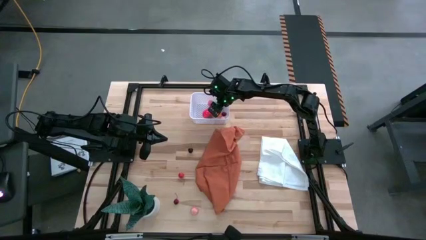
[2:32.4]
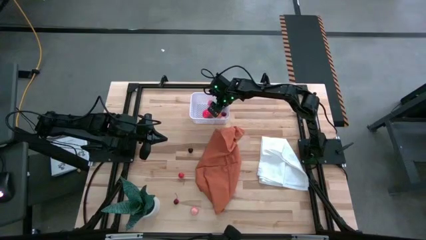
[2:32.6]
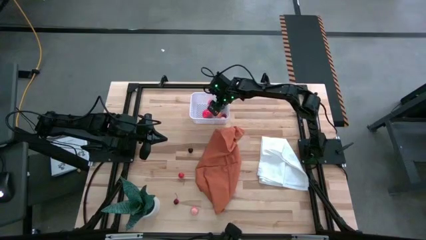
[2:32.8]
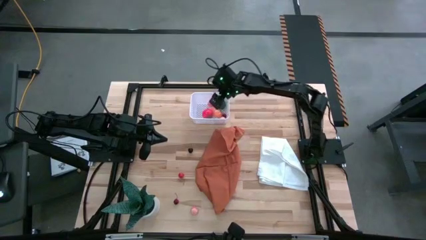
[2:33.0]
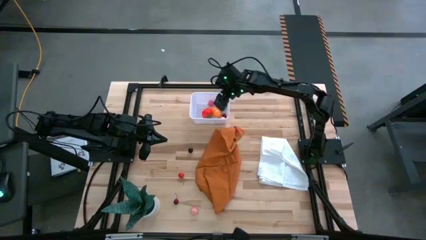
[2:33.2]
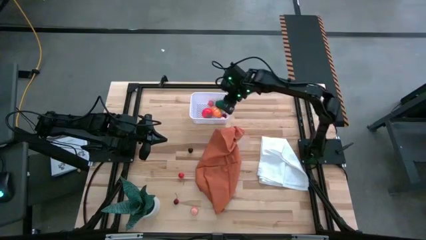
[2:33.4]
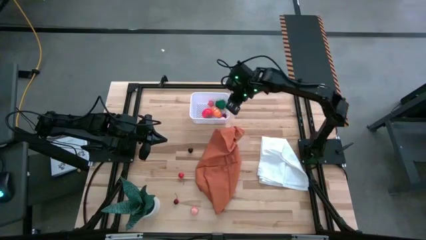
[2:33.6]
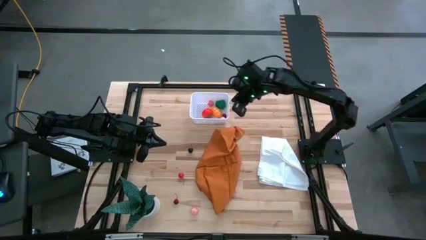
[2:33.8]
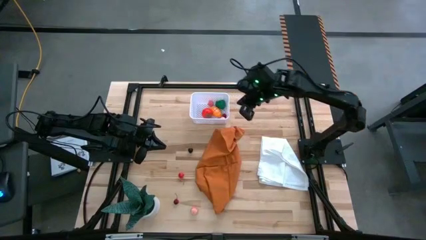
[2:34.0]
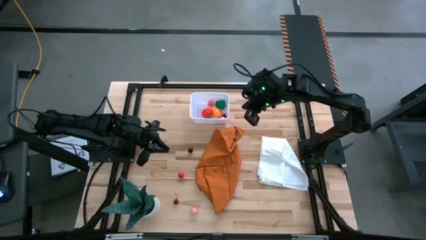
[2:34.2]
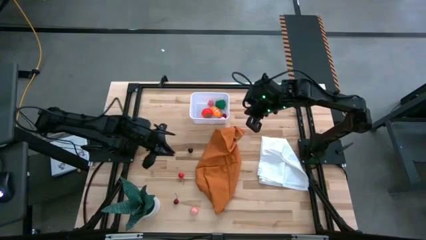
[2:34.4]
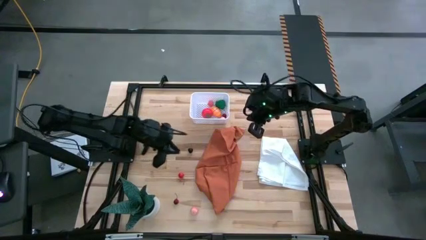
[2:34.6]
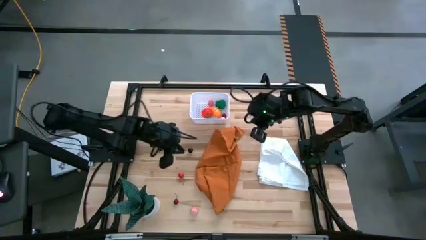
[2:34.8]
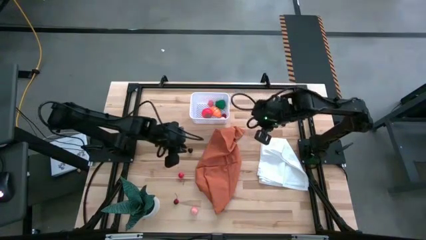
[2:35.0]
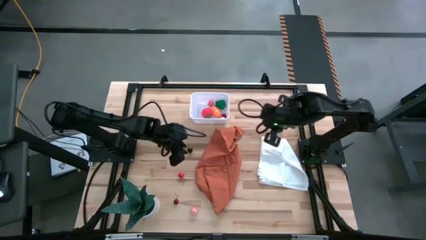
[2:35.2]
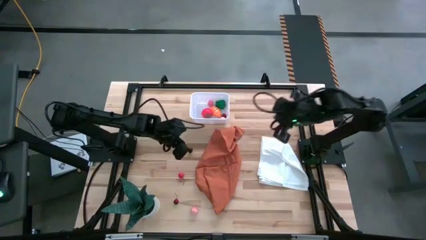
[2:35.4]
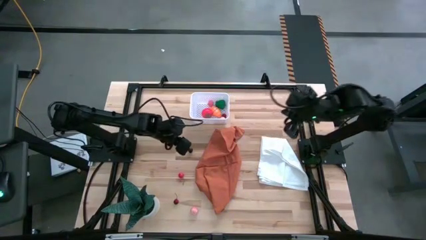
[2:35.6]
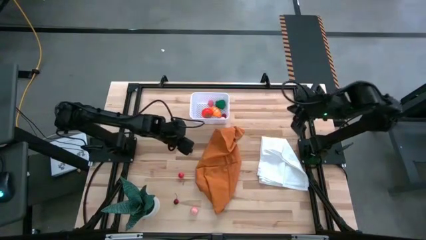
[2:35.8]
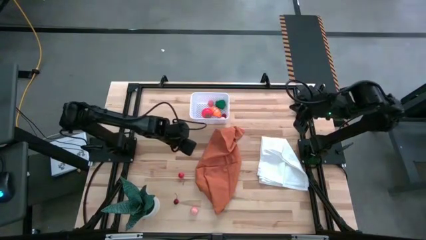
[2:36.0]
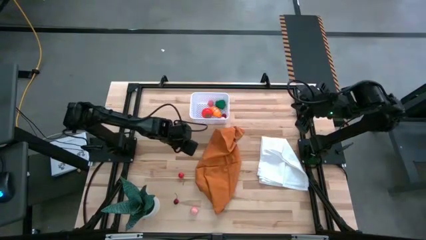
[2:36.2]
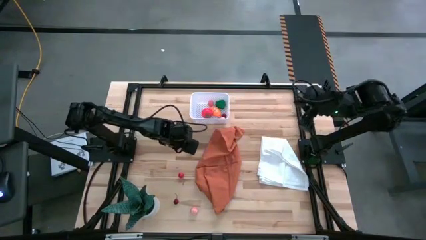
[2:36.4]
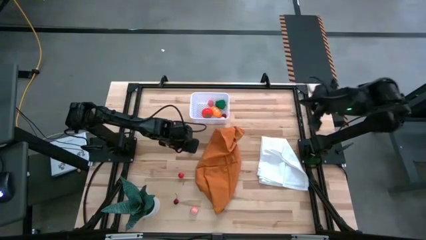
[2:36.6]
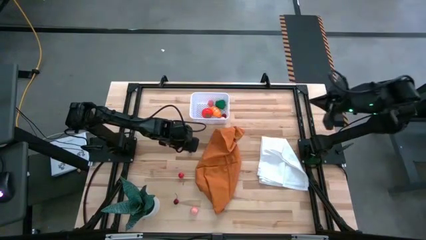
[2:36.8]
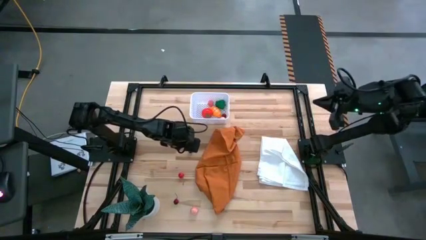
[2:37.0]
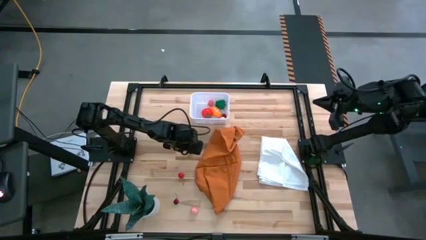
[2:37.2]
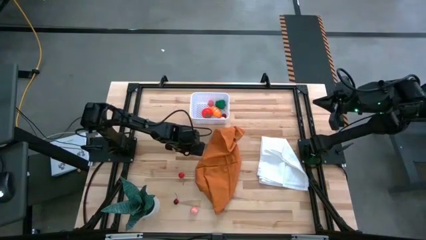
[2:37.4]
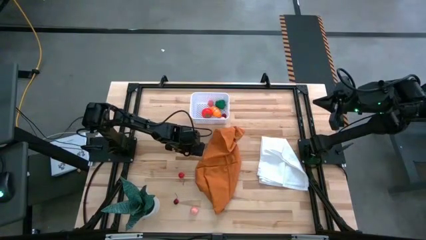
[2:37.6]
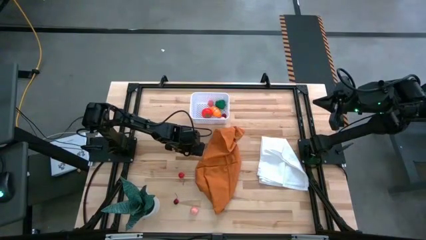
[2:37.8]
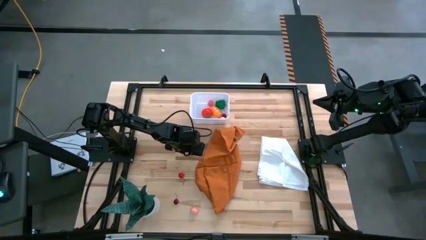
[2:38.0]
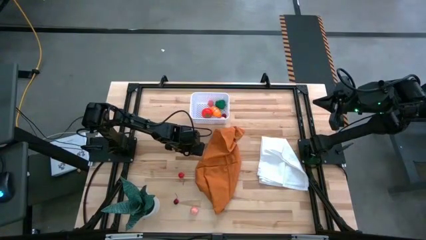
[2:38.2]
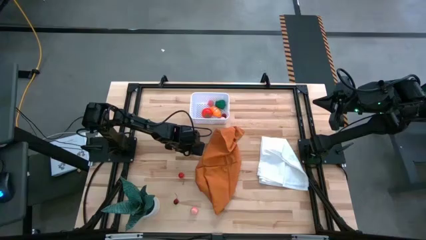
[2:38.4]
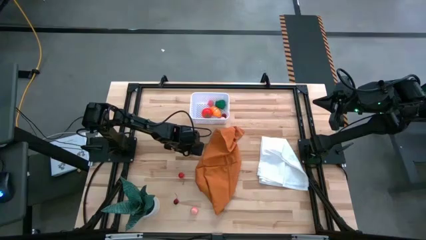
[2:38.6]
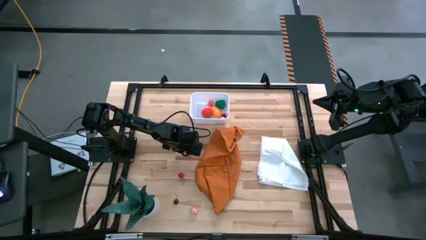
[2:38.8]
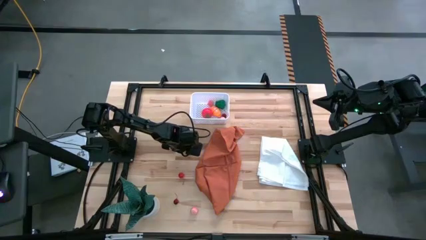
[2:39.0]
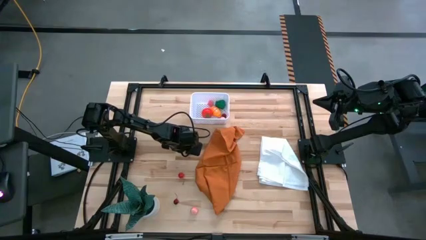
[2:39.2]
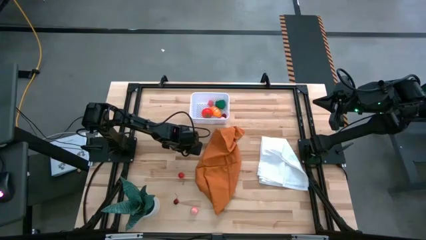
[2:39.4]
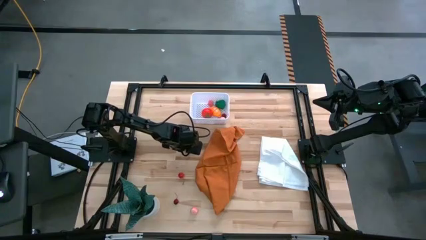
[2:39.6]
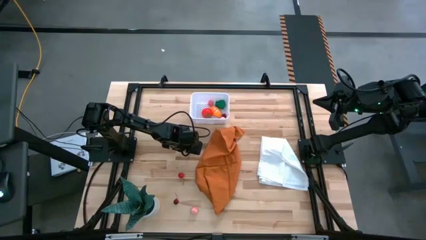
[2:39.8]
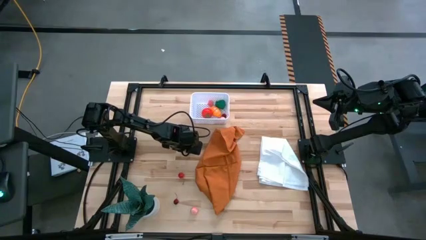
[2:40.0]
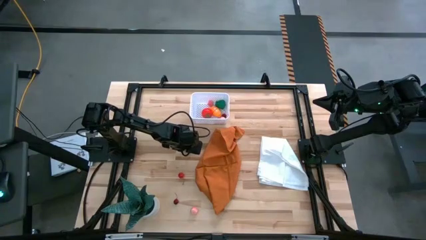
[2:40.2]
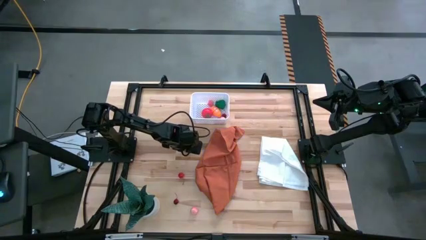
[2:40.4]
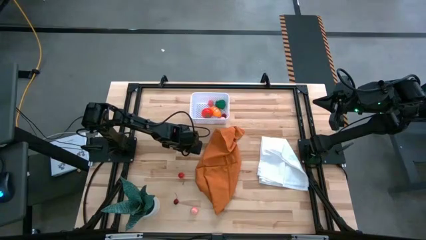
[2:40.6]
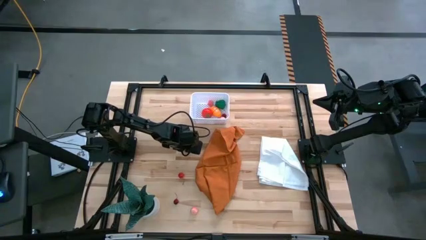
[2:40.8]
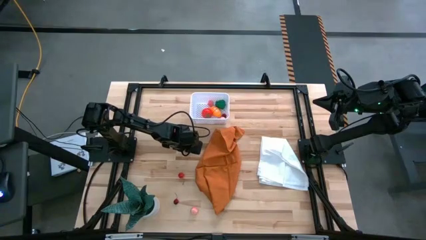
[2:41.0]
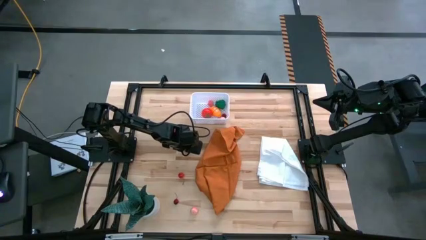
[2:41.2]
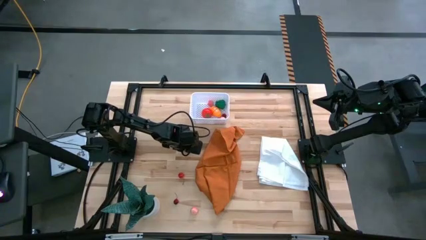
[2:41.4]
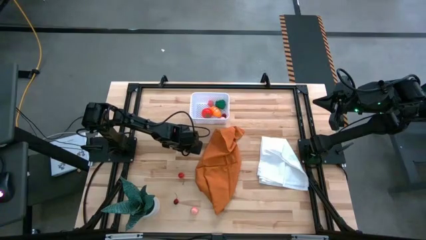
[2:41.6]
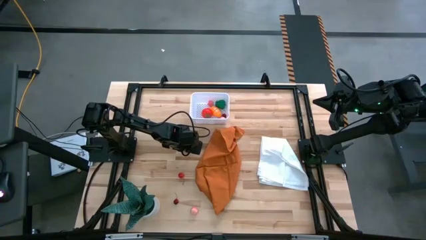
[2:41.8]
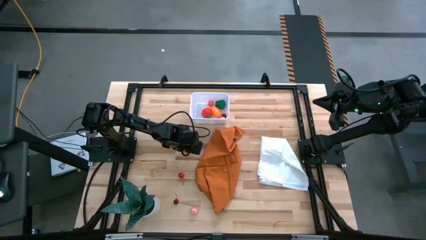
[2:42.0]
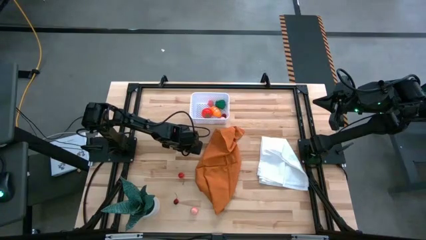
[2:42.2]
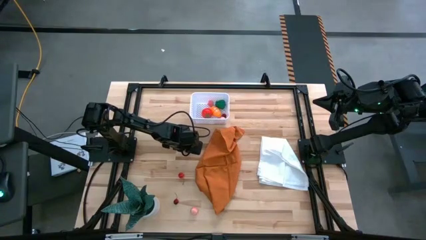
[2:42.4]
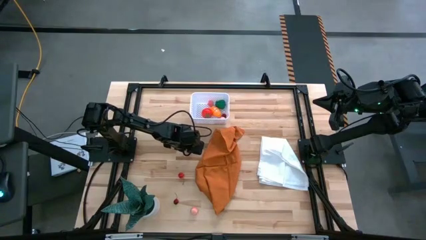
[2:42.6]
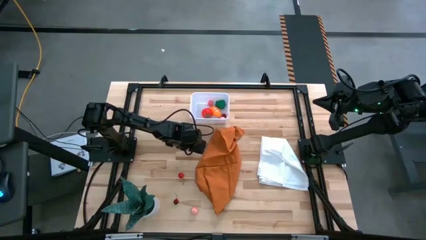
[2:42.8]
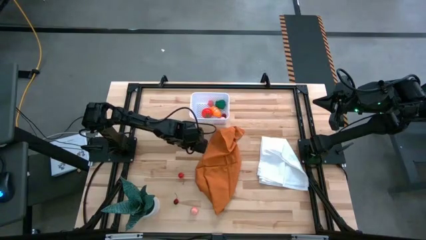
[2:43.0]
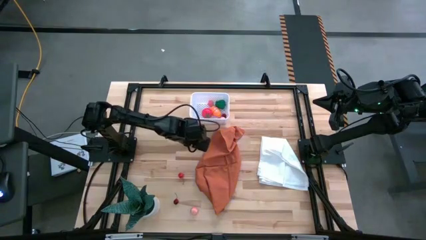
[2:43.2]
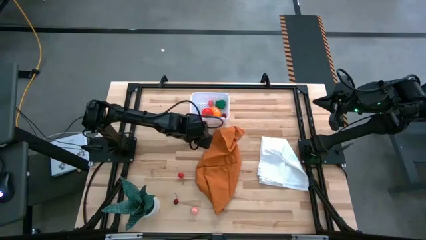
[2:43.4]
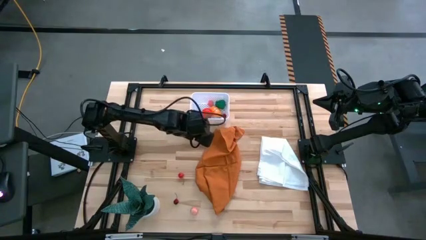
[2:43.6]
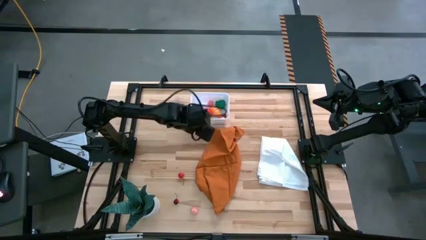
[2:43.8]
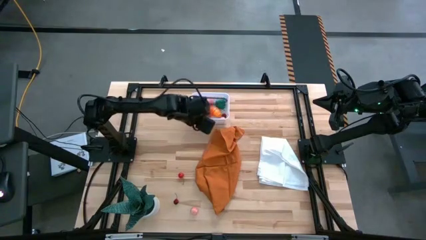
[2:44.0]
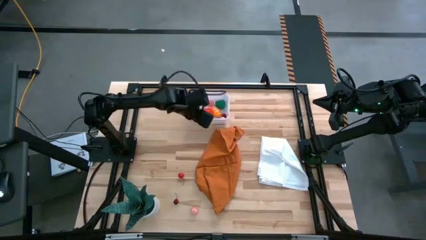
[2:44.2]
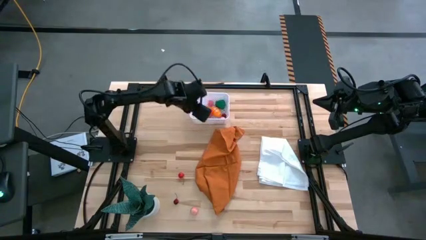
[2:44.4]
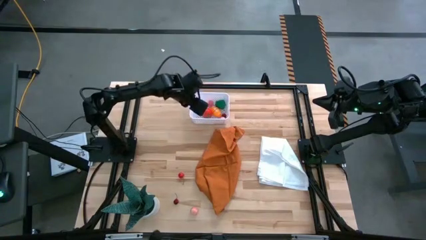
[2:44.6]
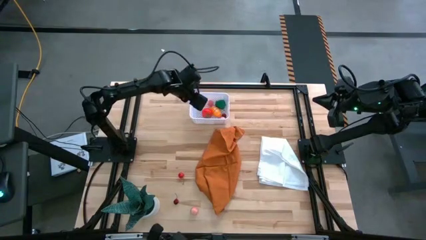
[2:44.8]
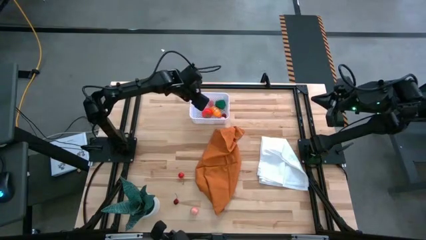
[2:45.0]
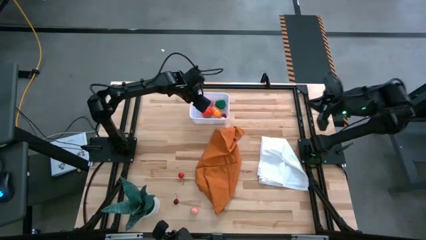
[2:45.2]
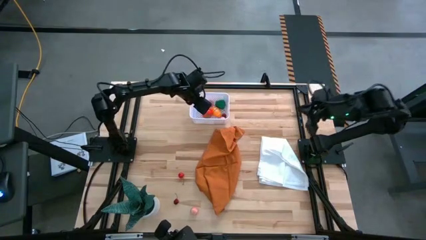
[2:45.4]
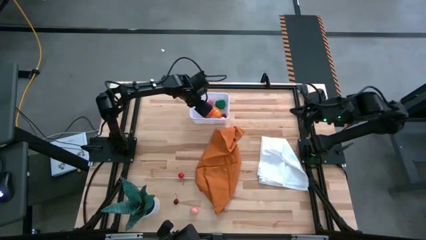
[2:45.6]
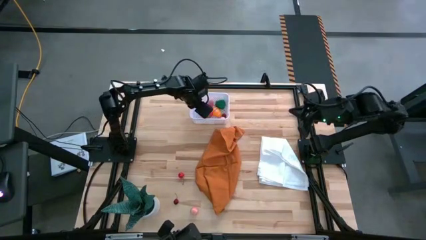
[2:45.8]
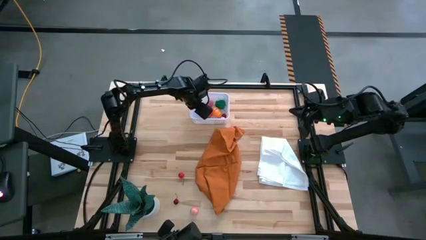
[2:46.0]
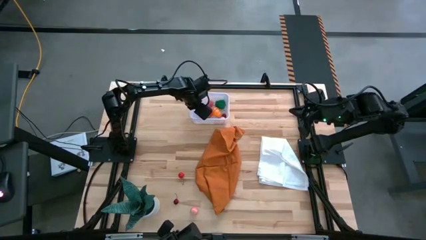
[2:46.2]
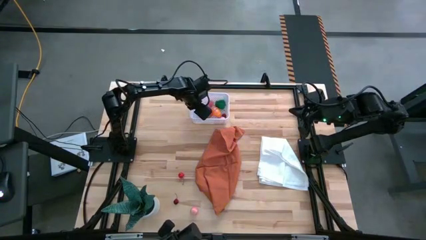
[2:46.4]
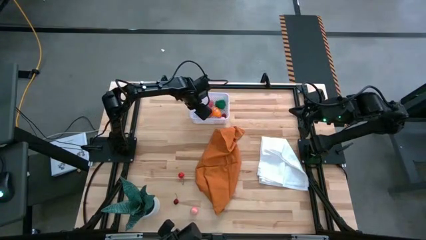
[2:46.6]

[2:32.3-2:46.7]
Task: Pick and placing Produce into tupperware
Put the black cherry into the white basket
